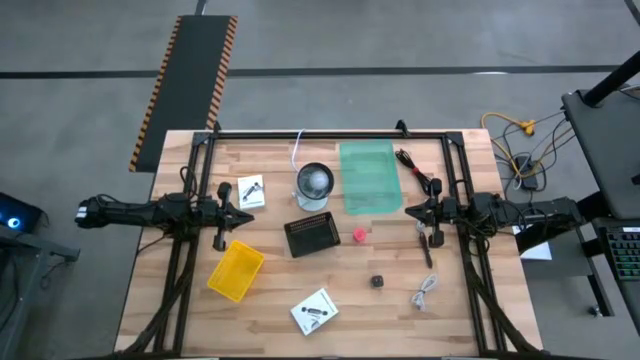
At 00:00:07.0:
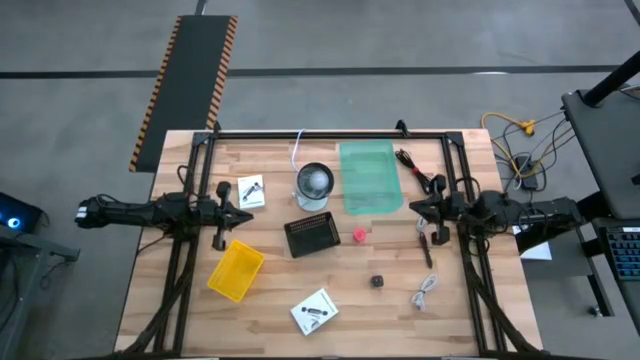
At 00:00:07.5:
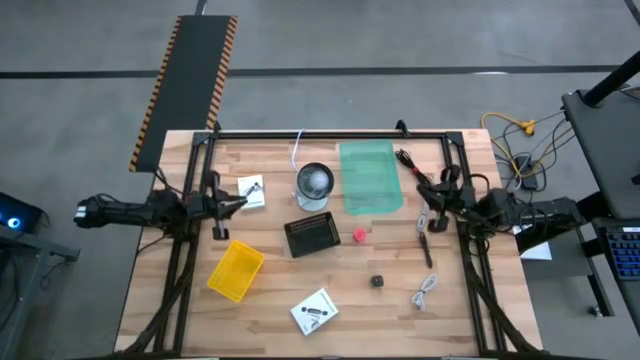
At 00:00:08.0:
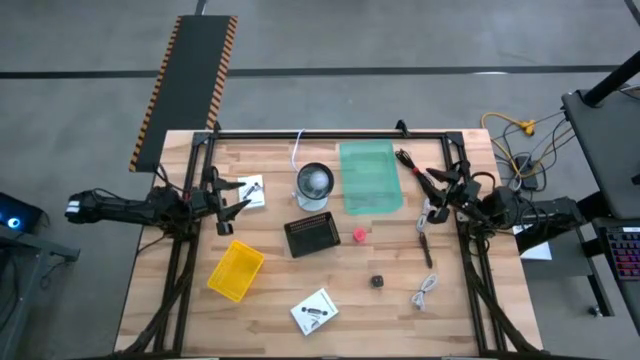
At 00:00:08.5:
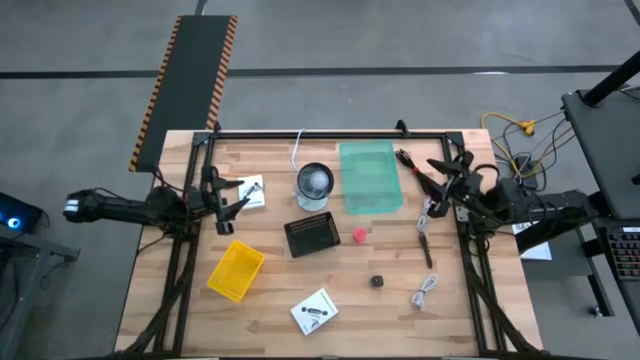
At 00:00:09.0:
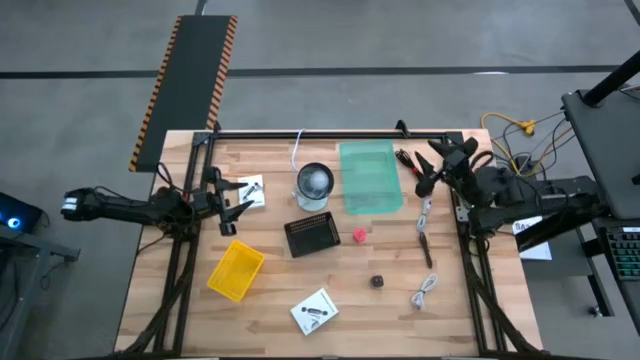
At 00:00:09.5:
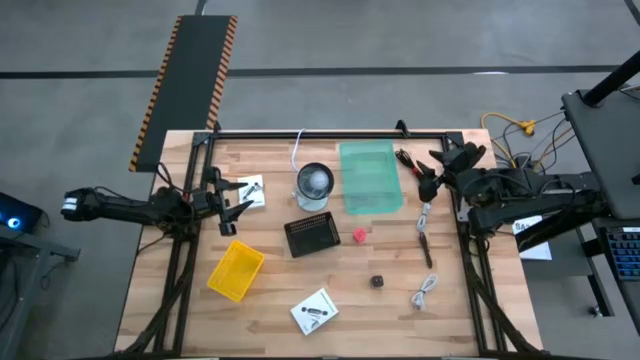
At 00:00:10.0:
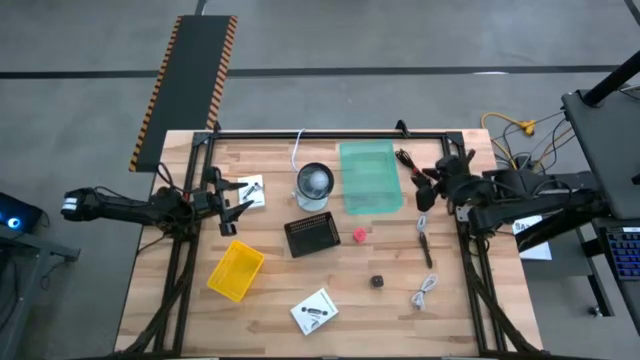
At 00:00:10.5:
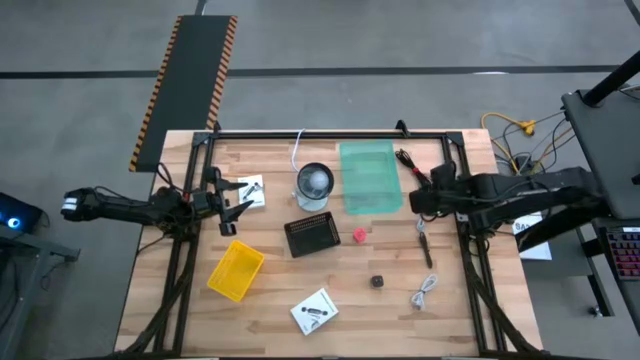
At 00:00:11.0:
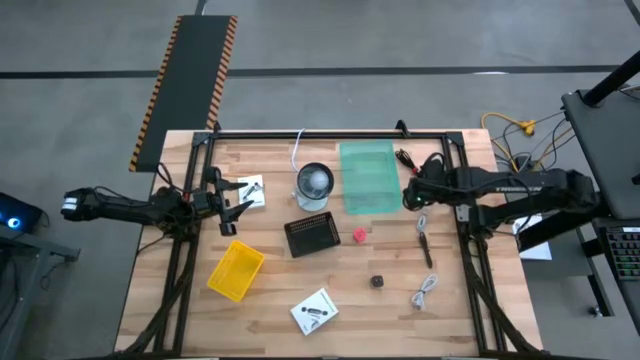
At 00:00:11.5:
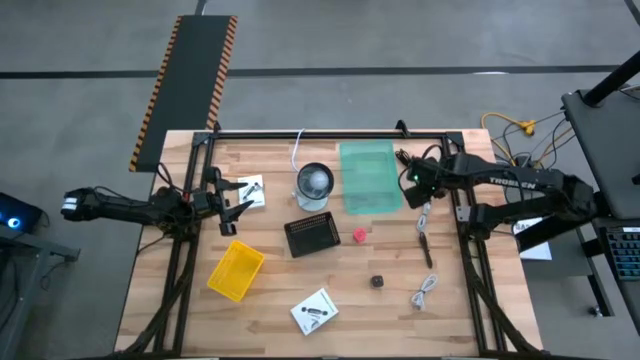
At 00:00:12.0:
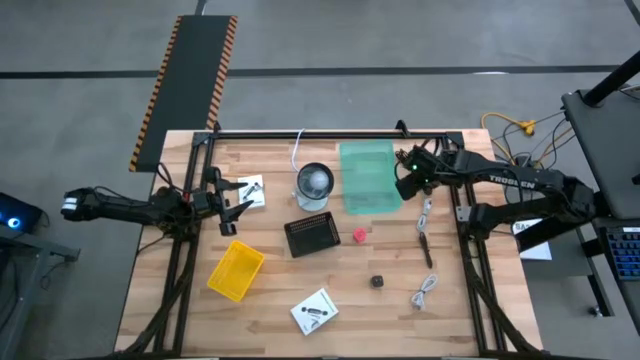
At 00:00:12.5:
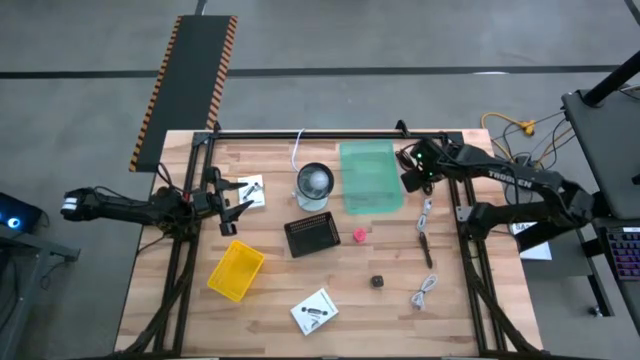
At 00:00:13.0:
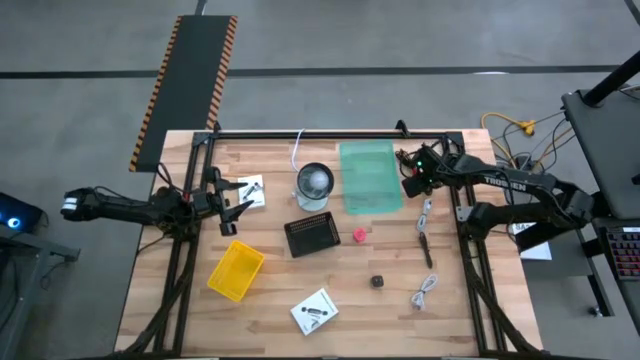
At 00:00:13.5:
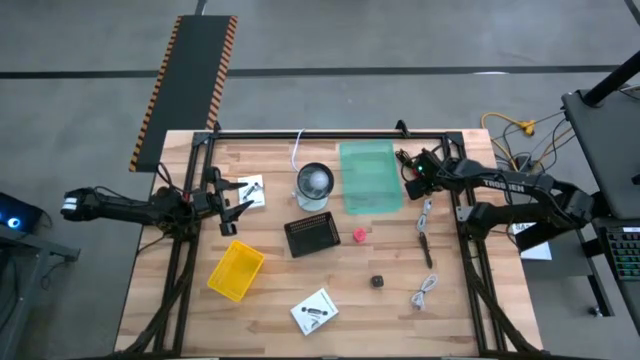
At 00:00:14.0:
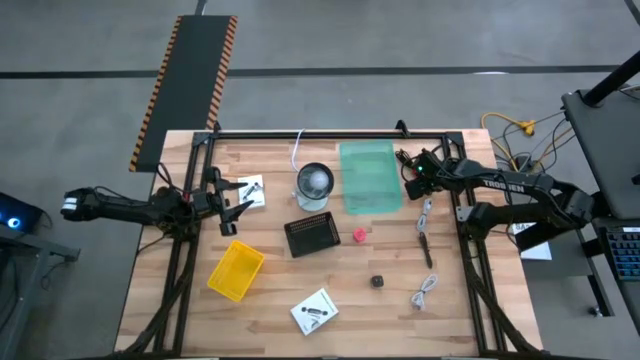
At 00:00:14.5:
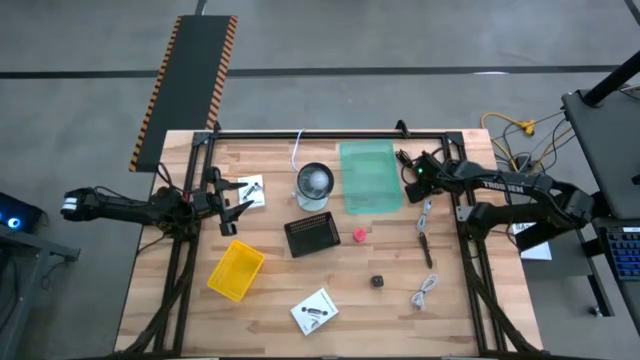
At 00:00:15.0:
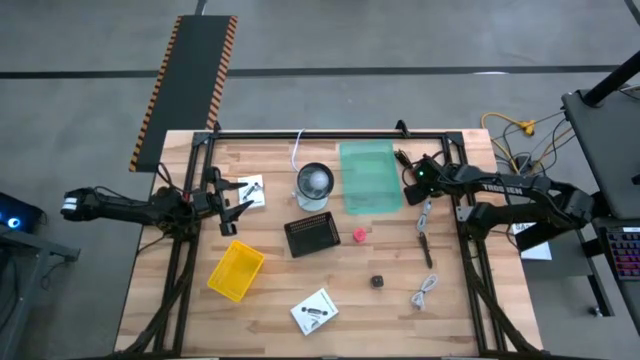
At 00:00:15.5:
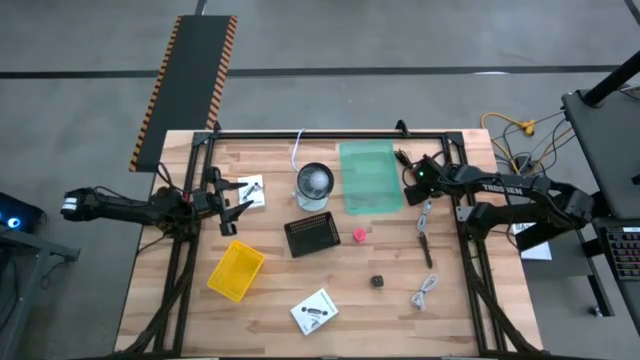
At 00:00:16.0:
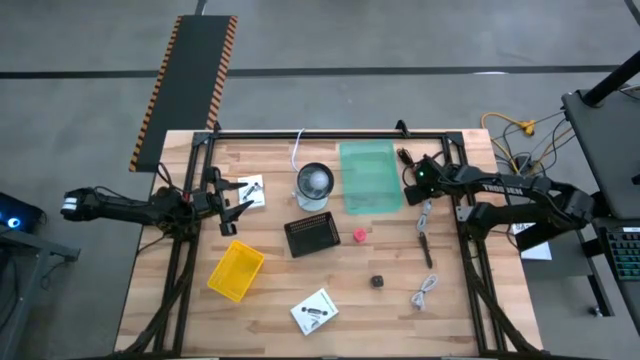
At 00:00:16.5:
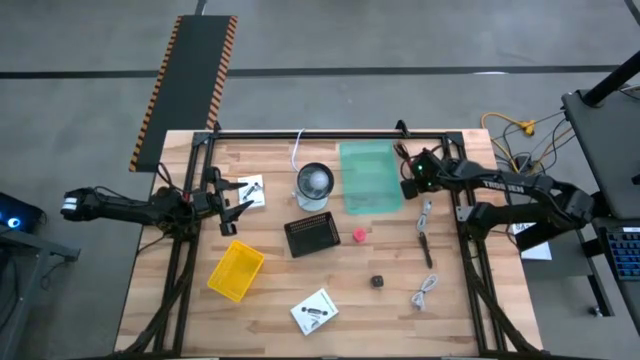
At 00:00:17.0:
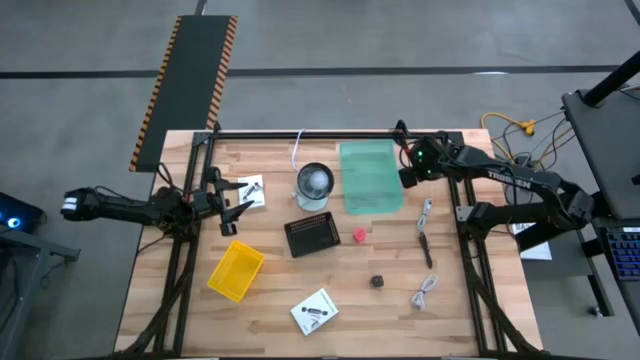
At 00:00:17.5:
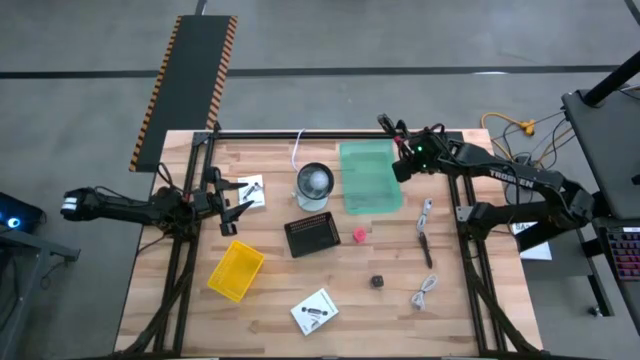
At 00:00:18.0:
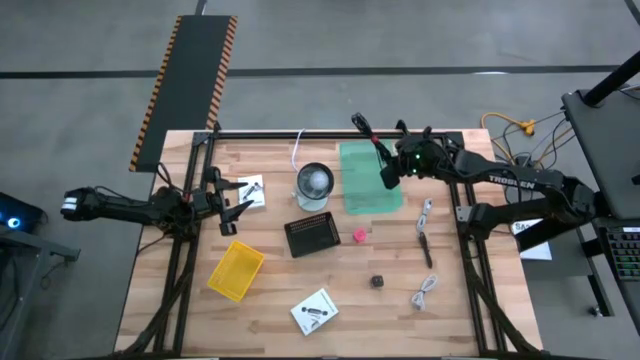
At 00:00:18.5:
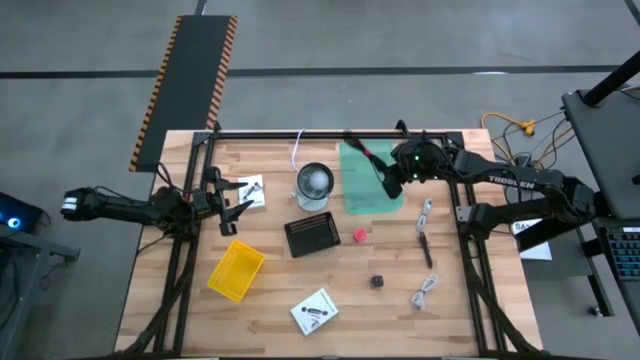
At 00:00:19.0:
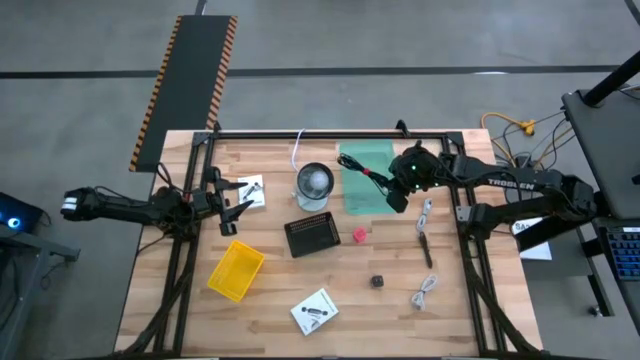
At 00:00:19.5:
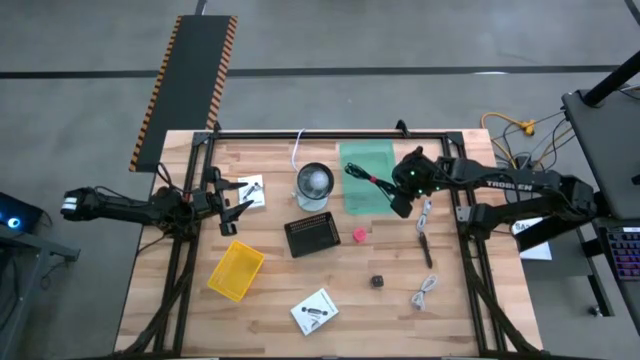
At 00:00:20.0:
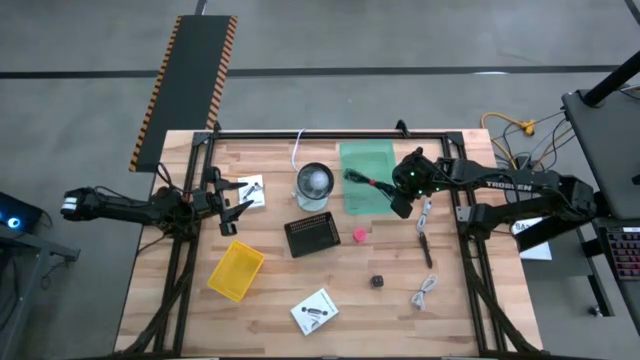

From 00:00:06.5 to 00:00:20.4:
Task: Pick and place items into bin
Put the top black charger cable into the blue bin

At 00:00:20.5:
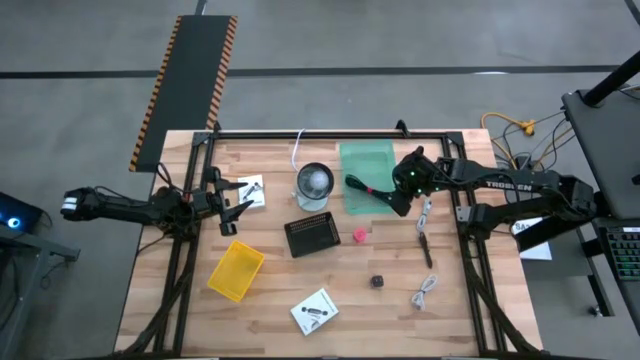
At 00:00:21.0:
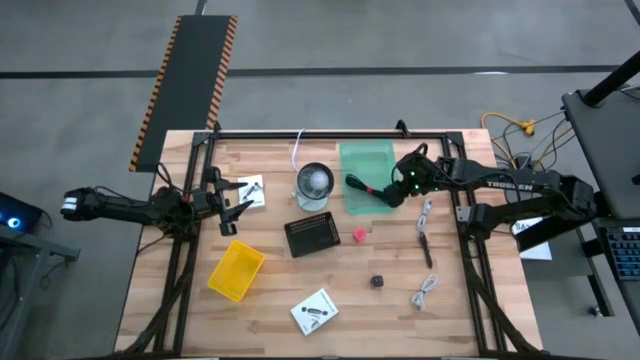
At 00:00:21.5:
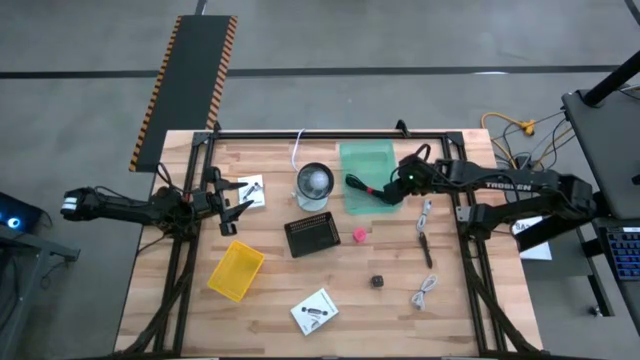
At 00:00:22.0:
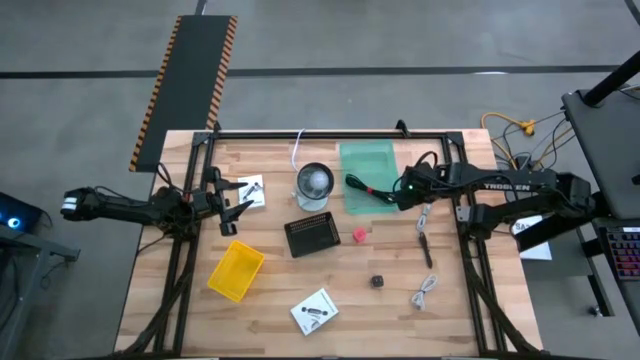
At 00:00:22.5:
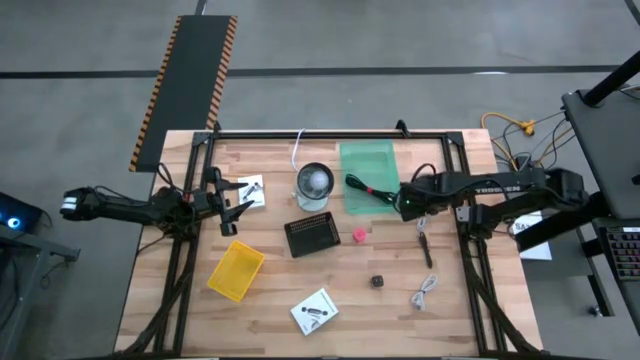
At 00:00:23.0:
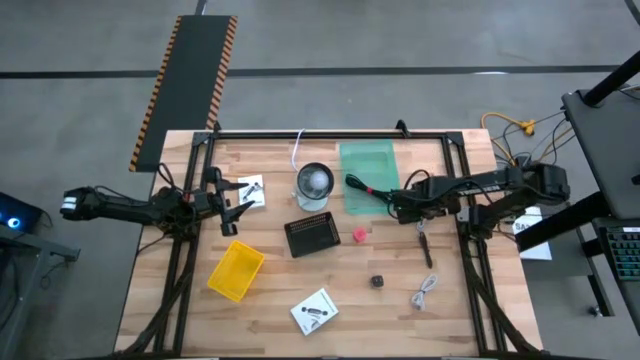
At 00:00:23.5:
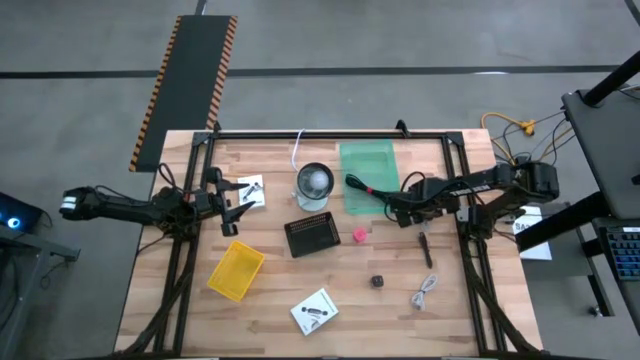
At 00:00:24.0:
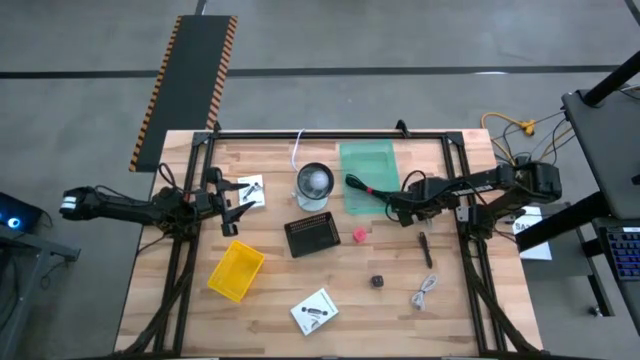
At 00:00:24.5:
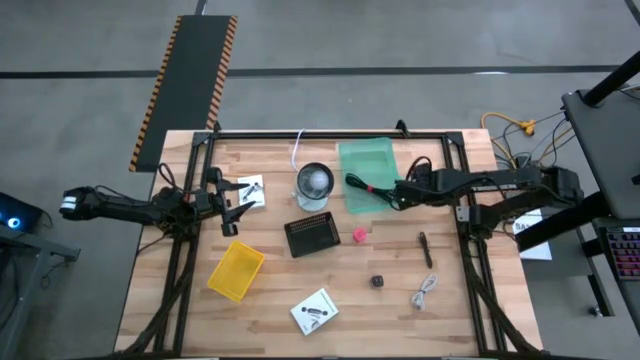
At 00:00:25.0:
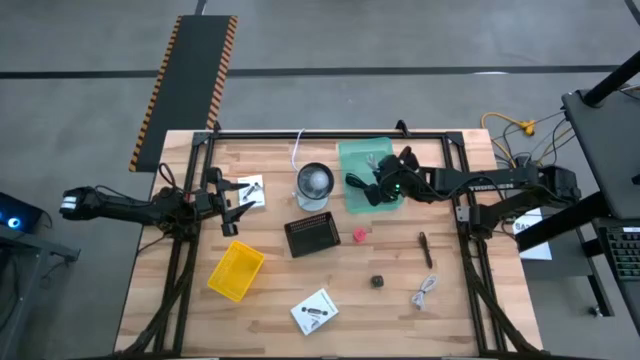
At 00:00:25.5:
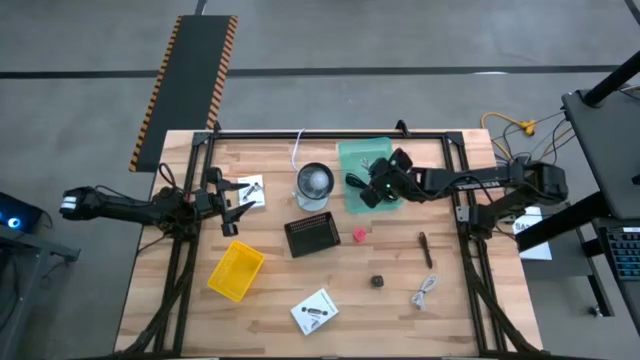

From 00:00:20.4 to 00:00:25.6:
Put the top white charger cable into the blue bin
